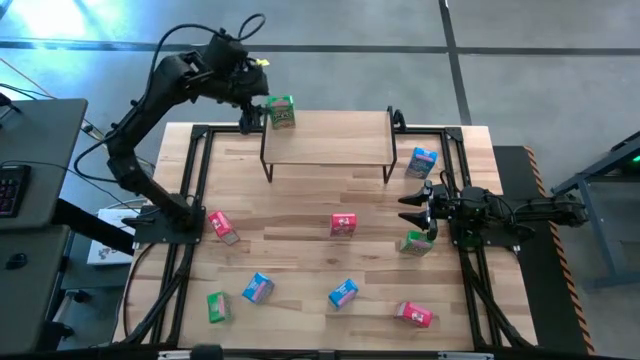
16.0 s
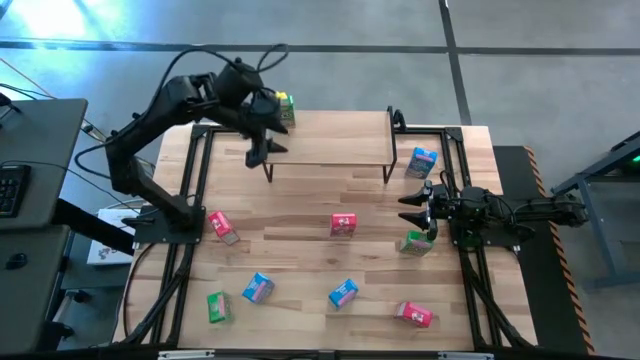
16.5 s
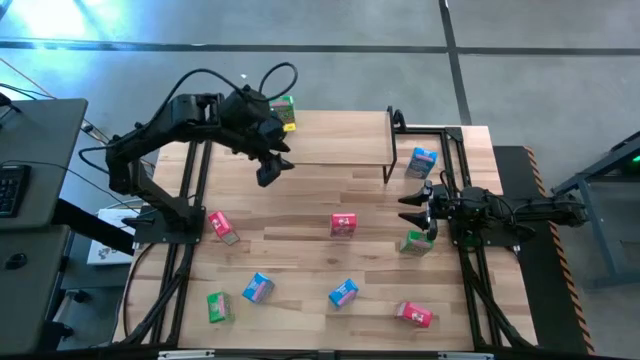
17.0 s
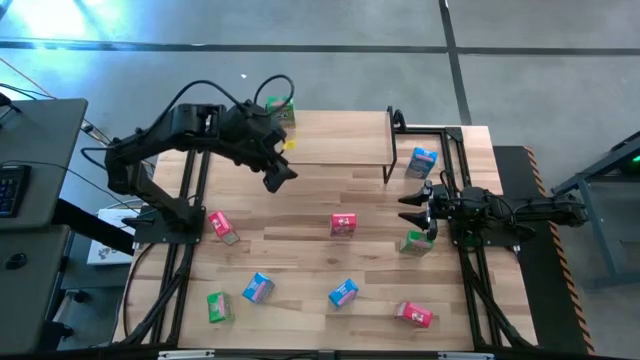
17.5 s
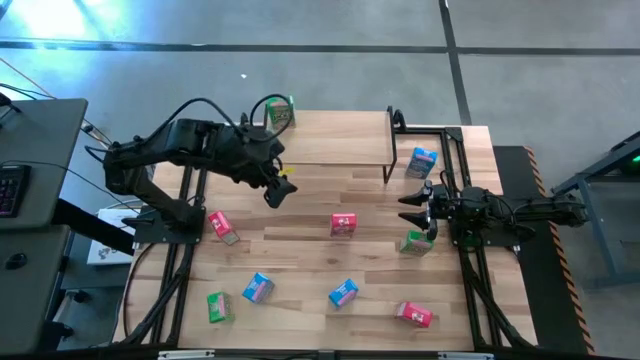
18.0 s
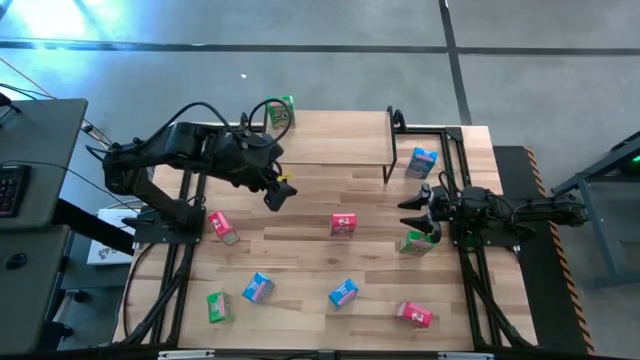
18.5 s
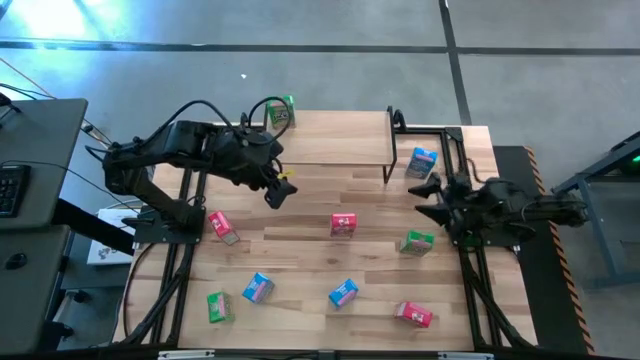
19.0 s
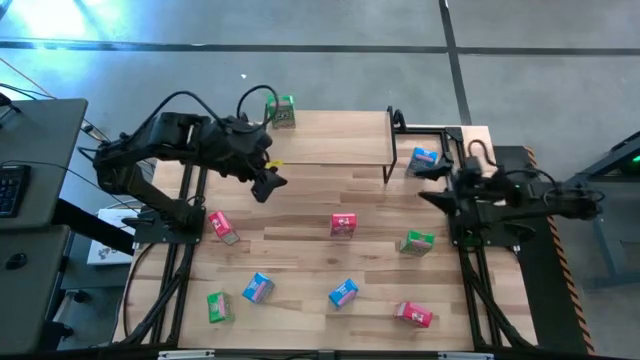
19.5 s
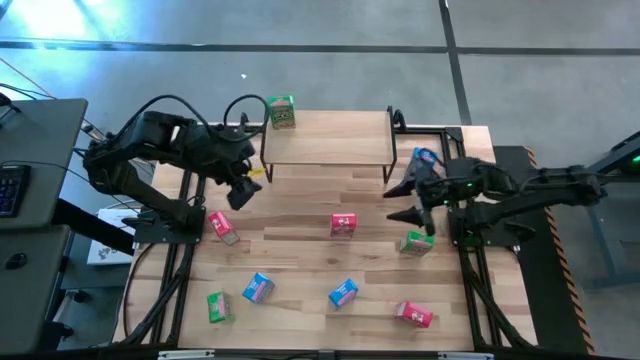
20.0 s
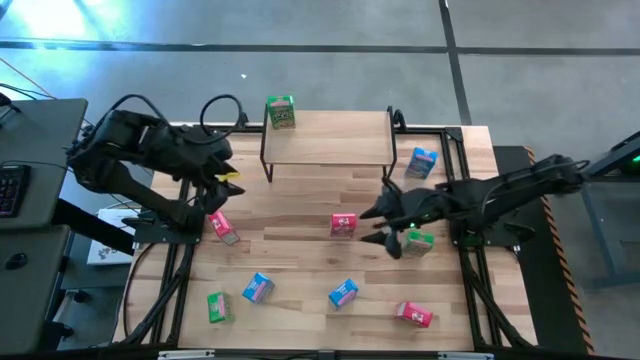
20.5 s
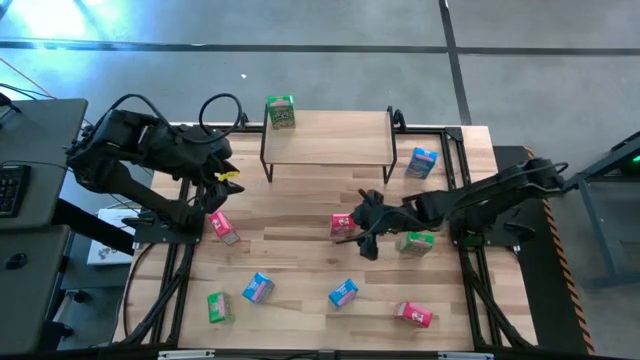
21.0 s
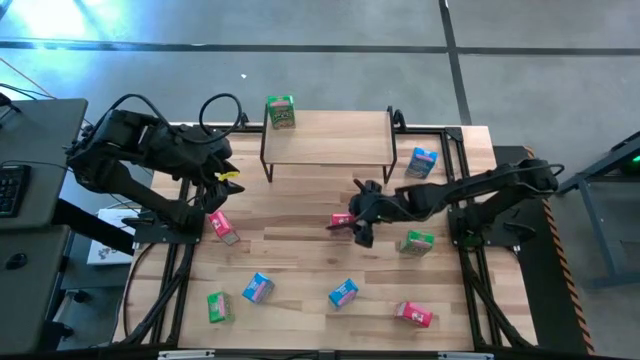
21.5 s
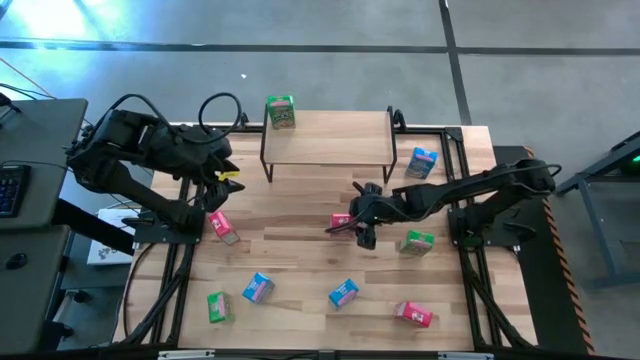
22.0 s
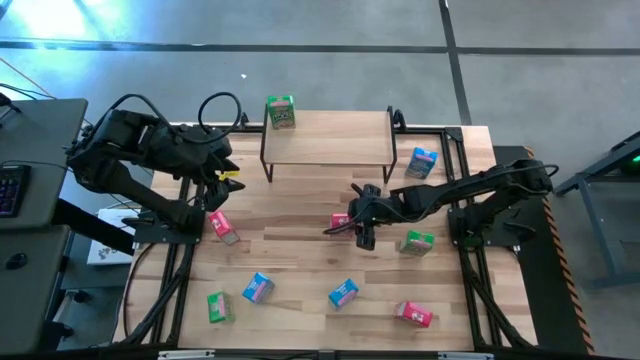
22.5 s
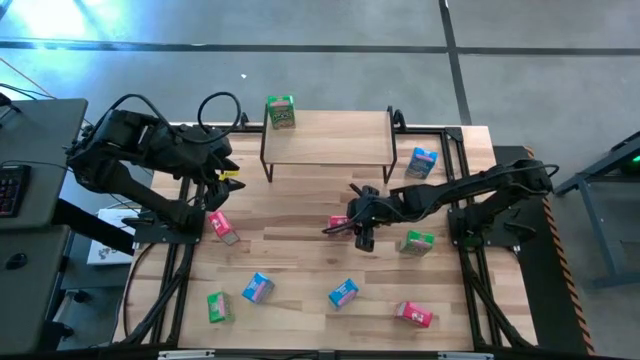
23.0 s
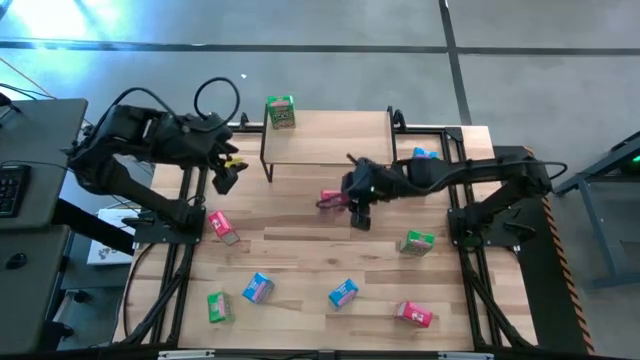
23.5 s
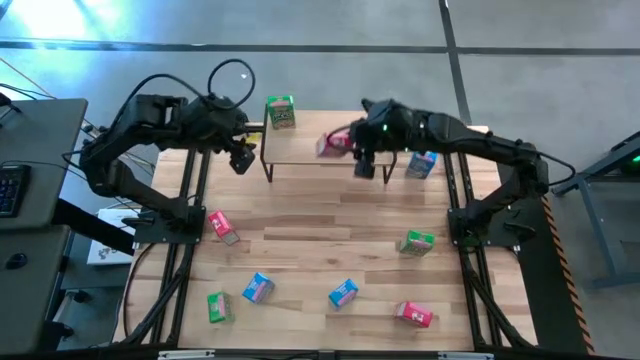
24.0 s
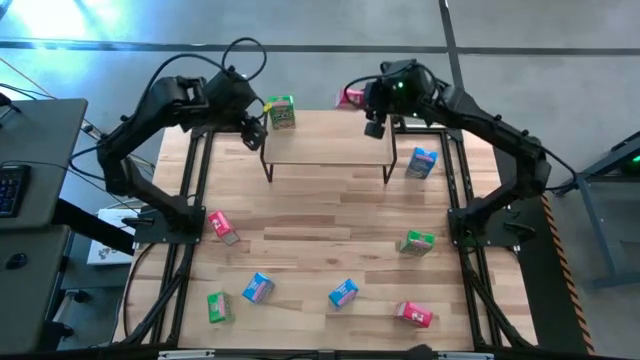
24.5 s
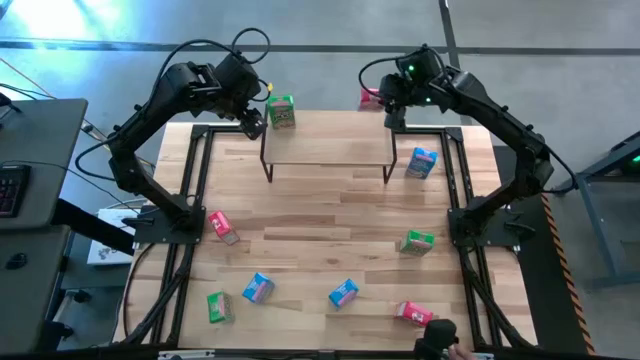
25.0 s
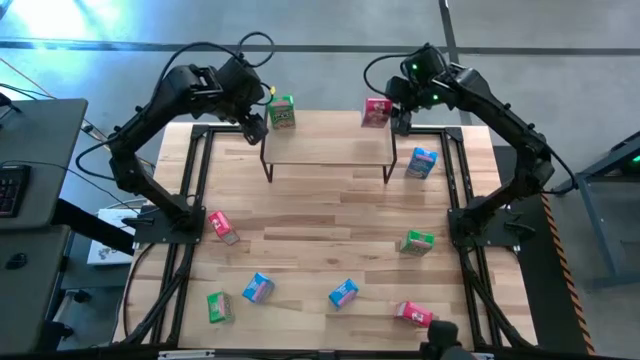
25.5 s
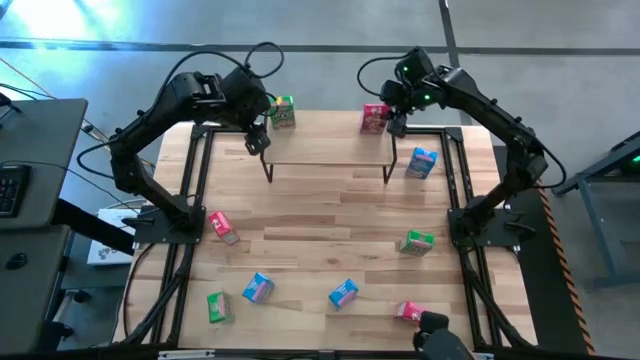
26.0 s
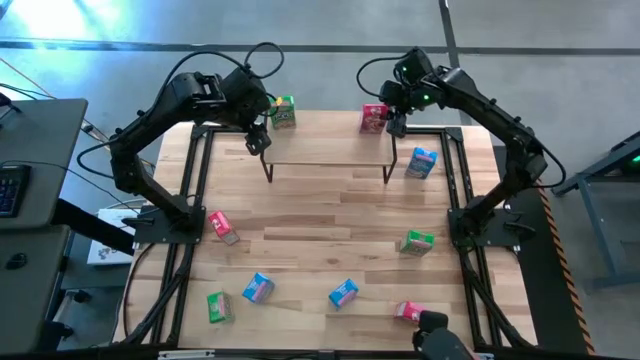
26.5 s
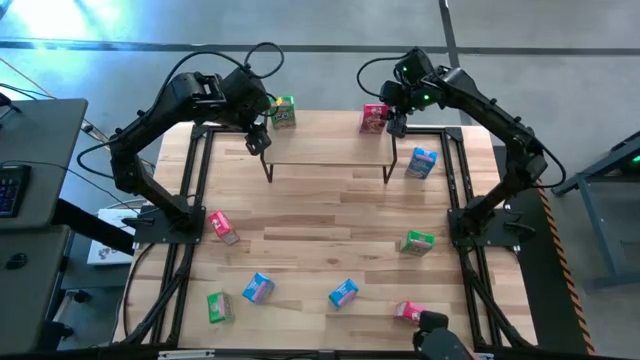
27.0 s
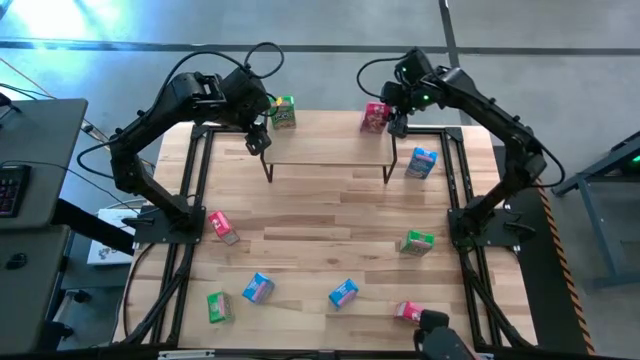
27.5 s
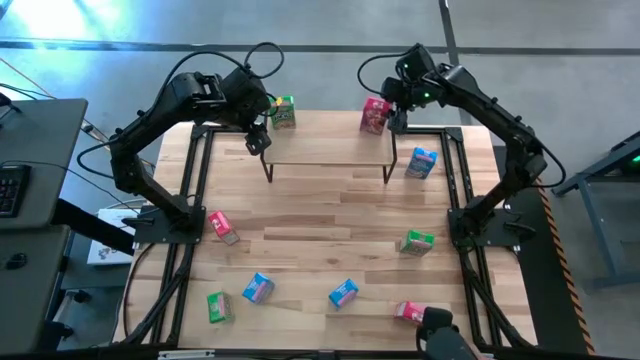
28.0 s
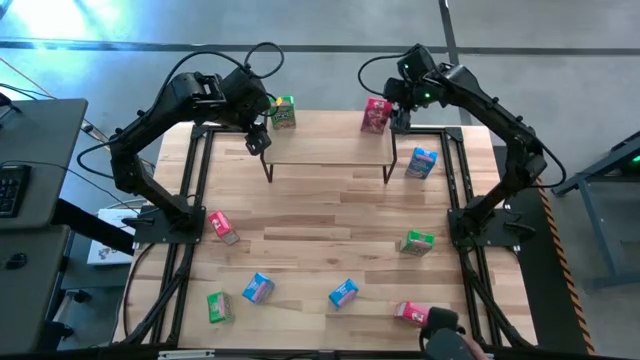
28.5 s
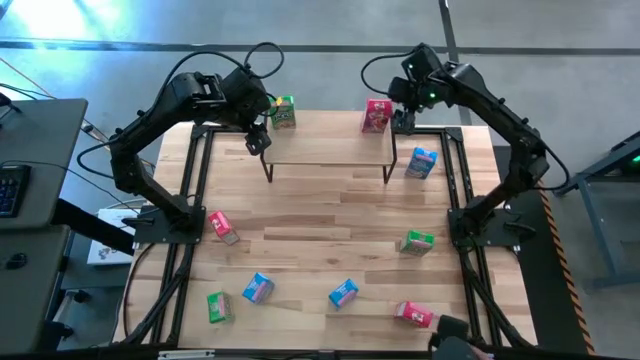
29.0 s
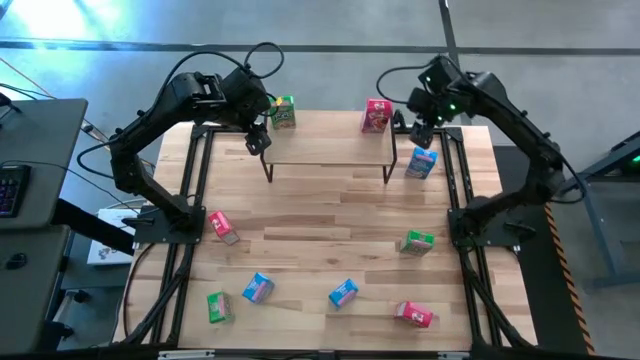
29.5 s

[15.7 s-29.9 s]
Task: Stack cereal on shelf
Put the right red cereal box on the shelf

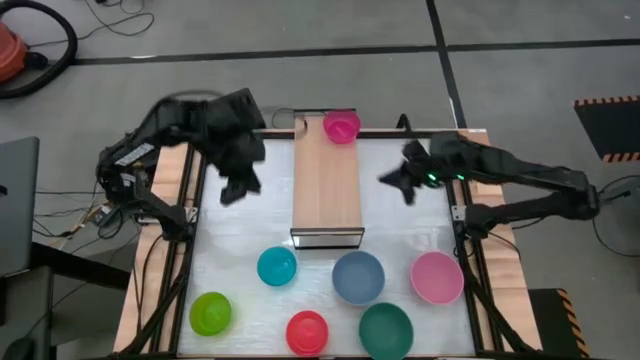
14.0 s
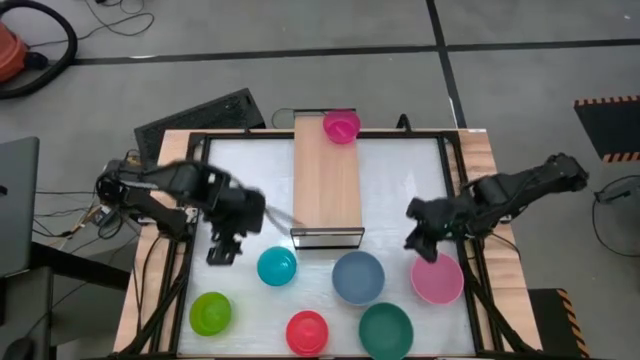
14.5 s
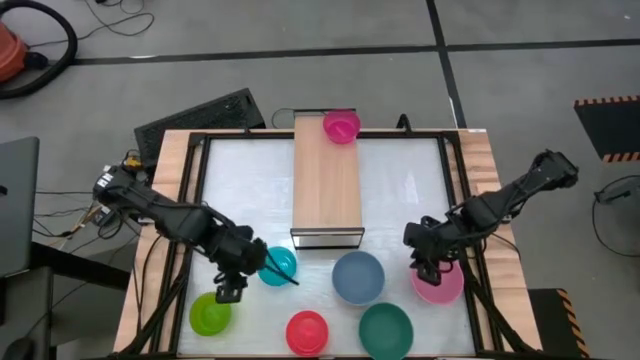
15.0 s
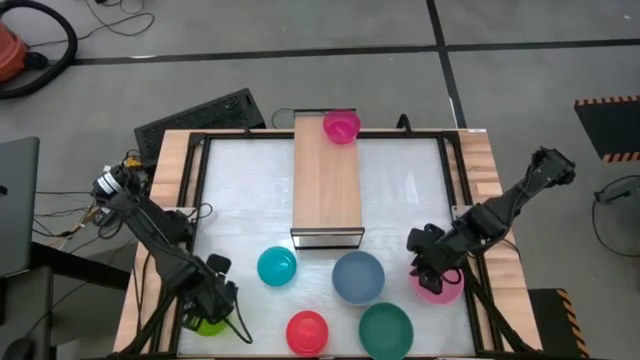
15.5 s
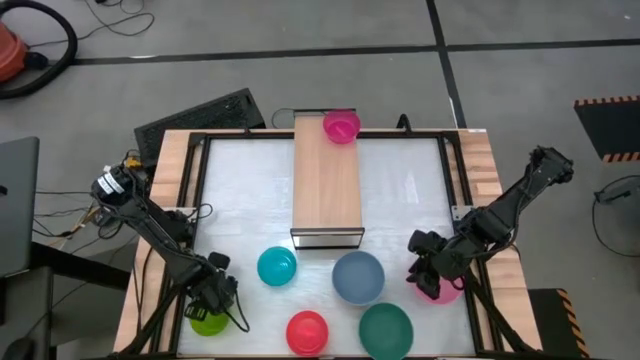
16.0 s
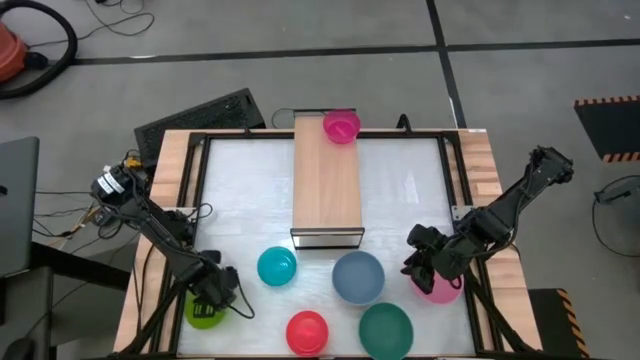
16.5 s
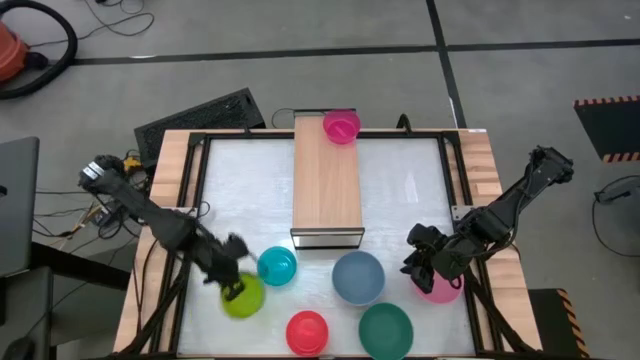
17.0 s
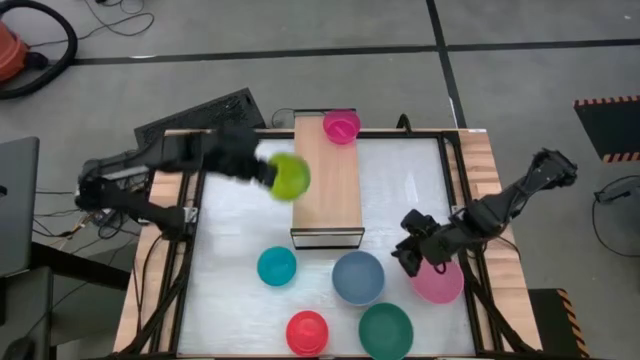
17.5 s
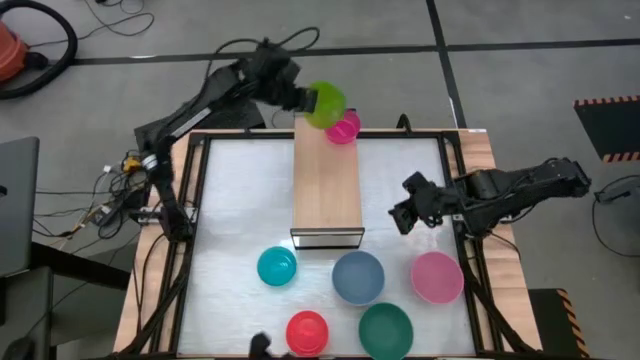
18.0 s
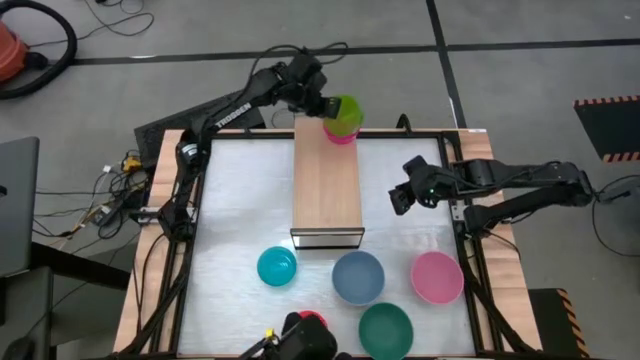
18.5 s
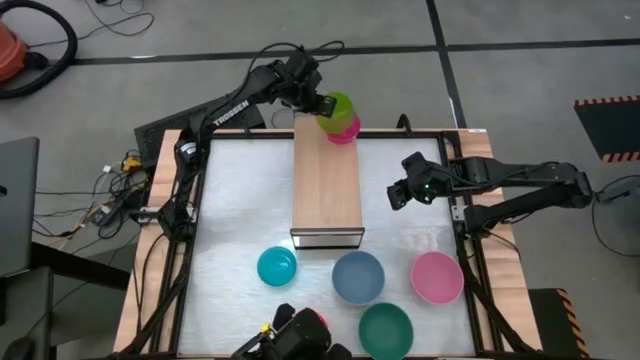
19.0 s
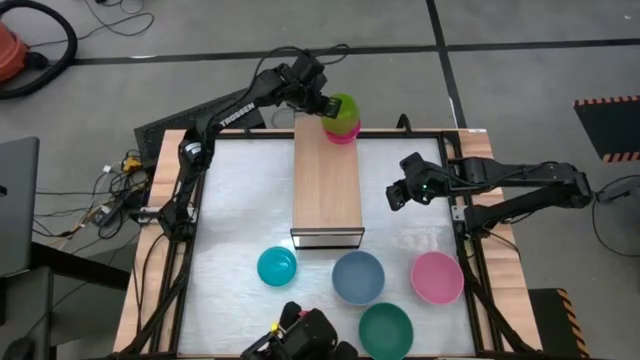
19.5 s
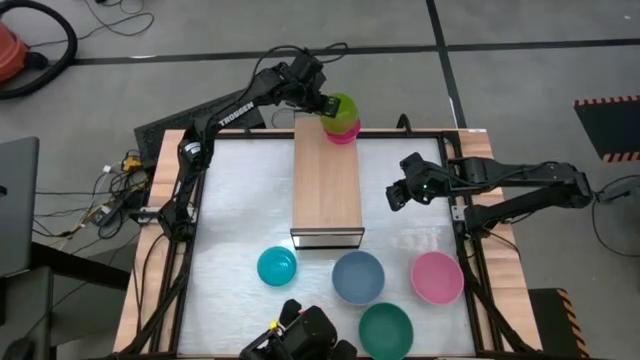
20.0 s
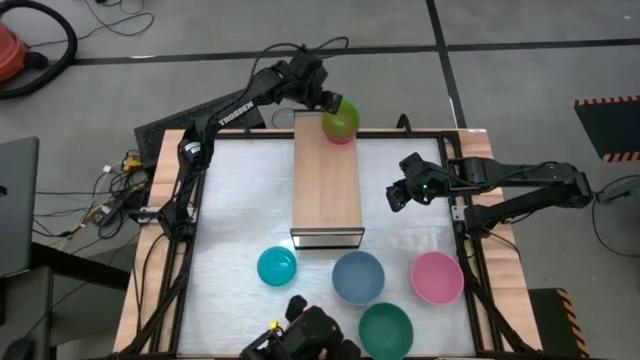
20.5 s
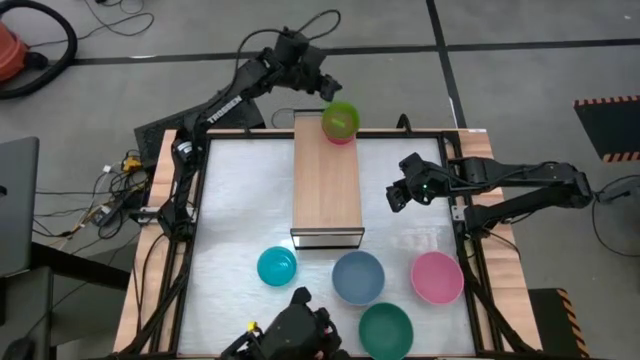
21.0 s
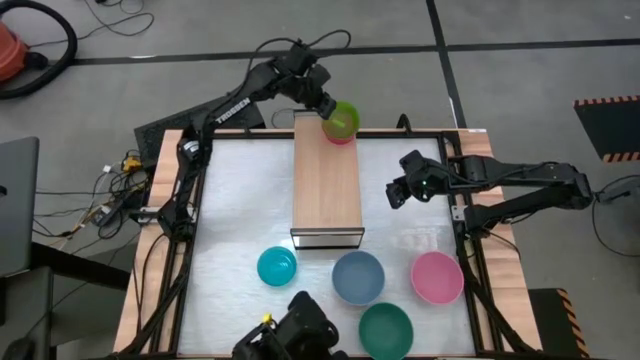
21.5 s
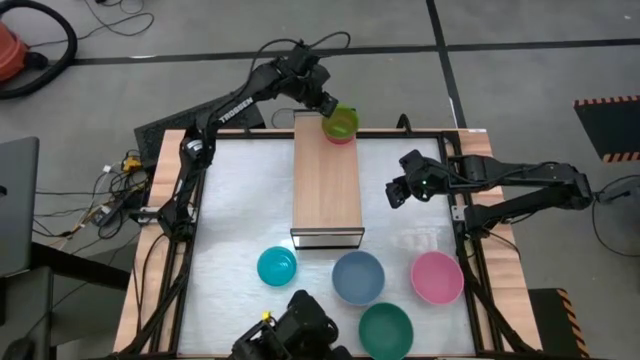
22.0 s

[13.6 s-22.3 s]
Task: Place and stack bowls onto a shelf
Stack the green bowl on top of the pink bowl on the shelf
